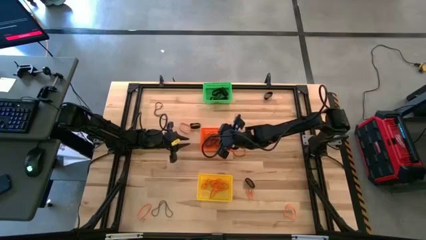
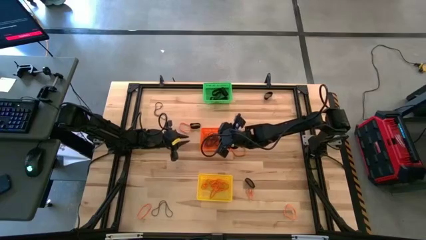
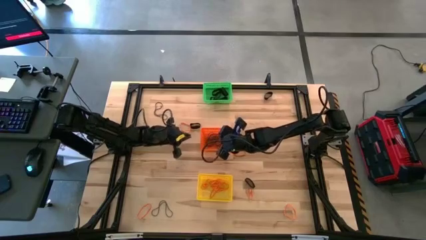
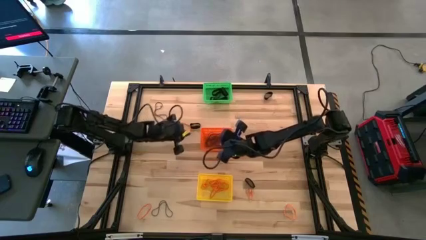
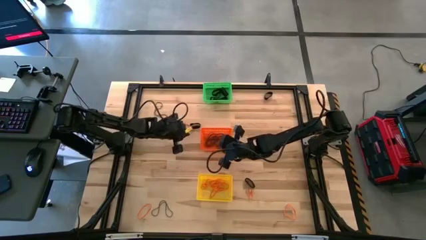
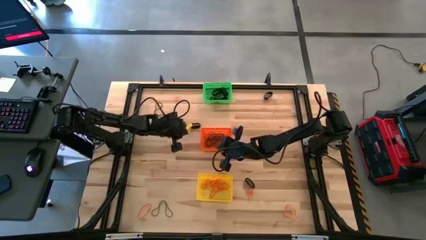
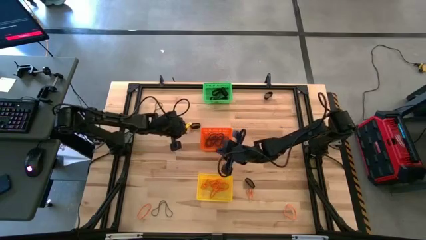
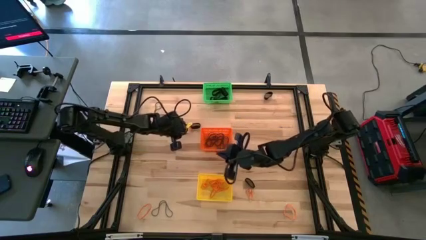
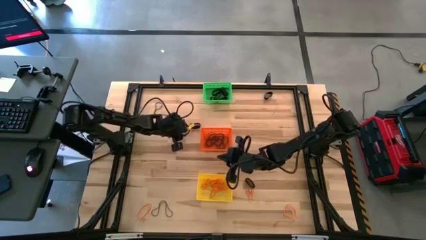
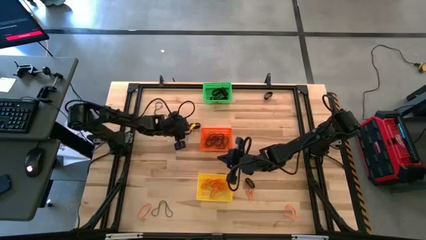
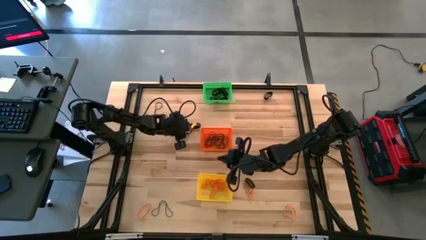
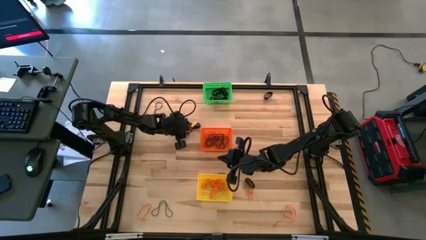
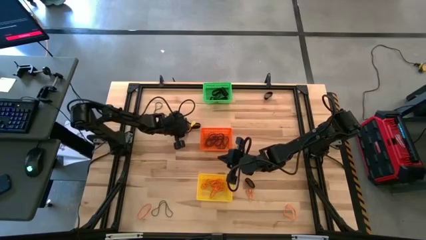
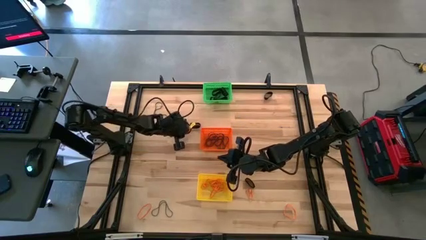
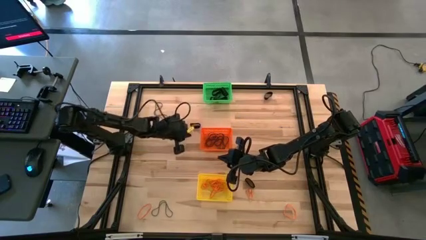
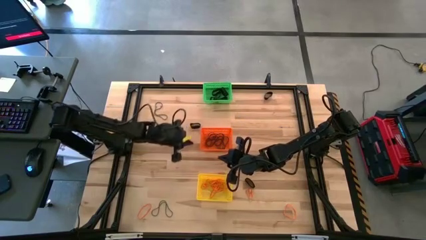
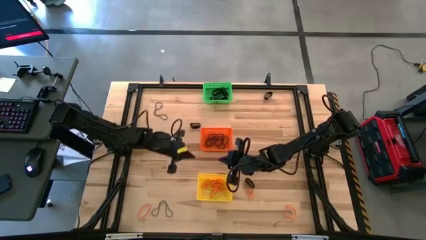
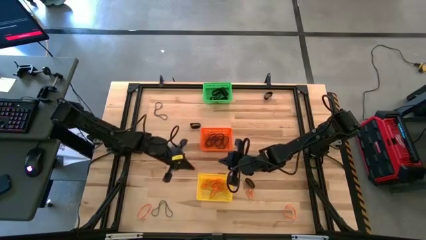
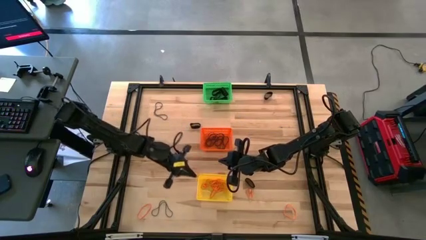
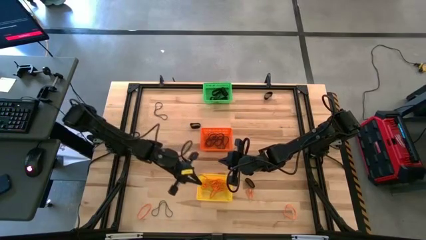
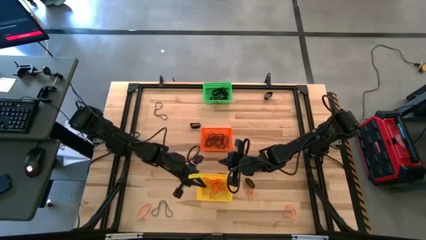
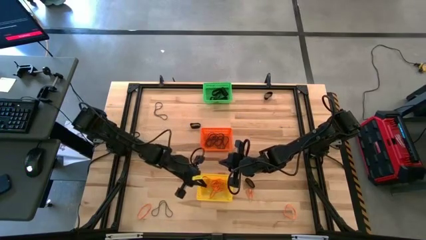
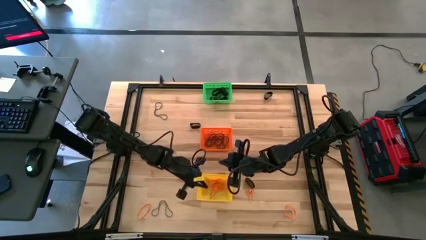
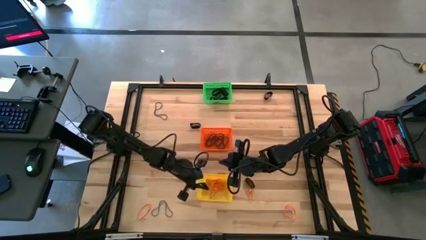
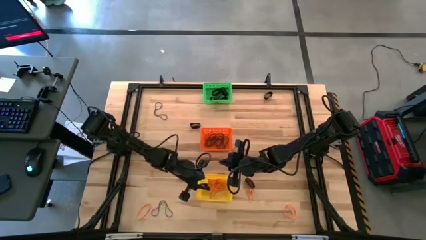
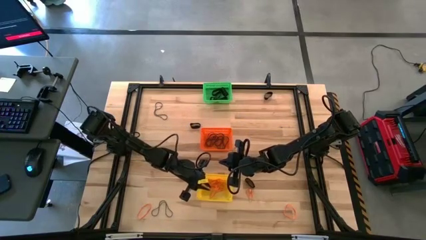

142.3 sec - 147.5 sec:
Task: Sort rubber bands into baskets
Put the orange rubber band into the yellow bin

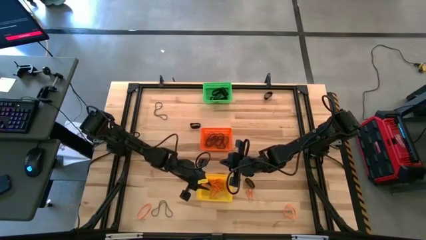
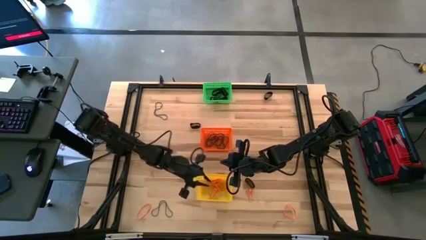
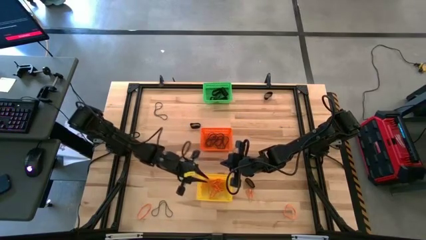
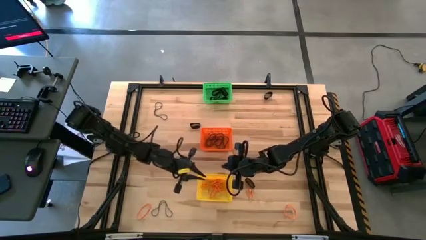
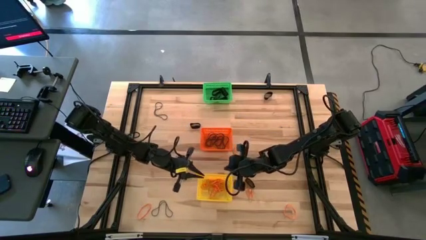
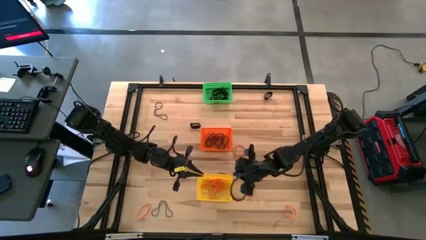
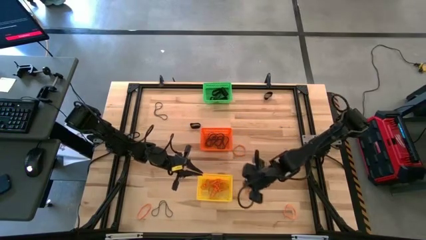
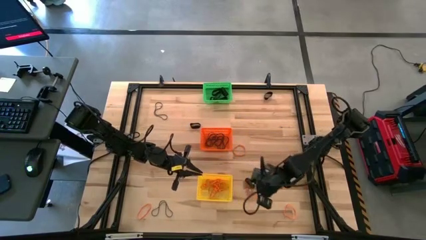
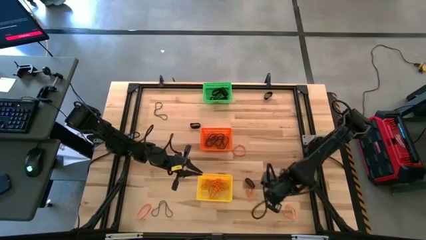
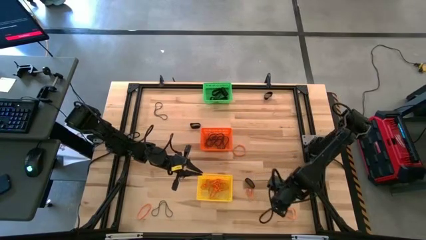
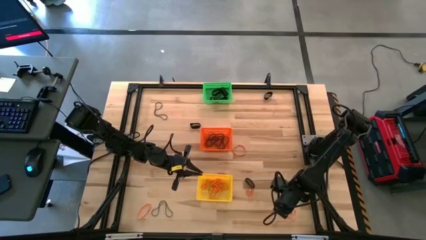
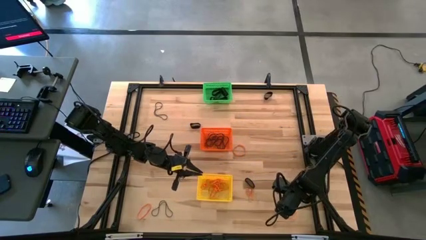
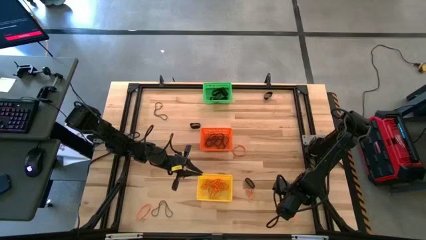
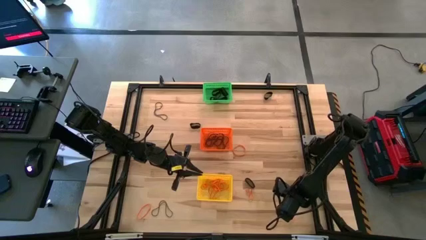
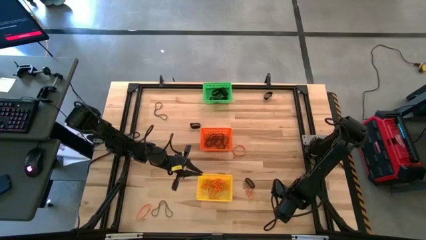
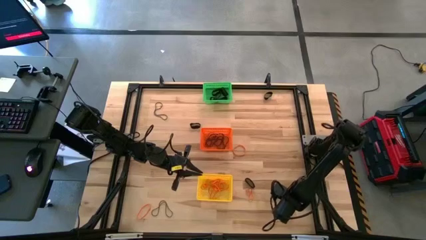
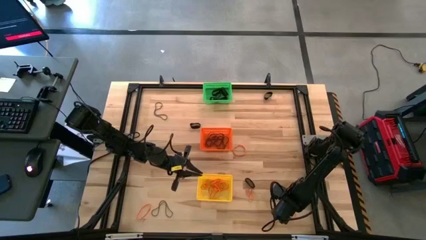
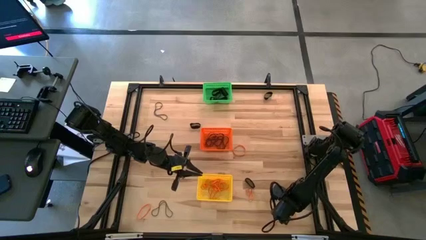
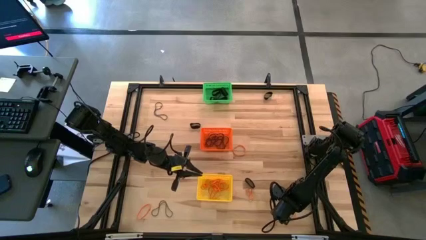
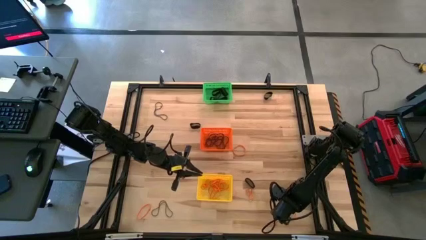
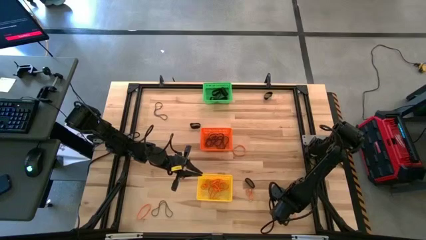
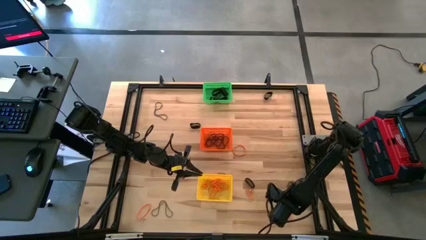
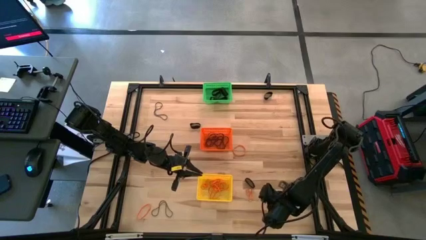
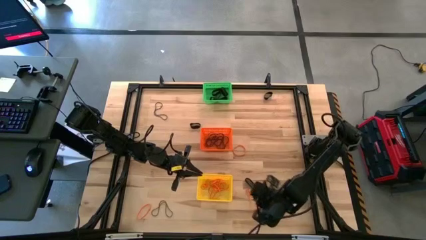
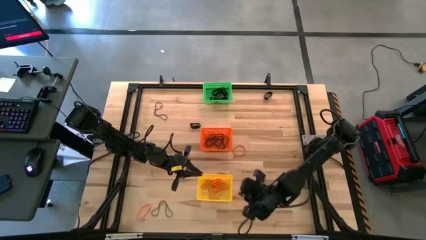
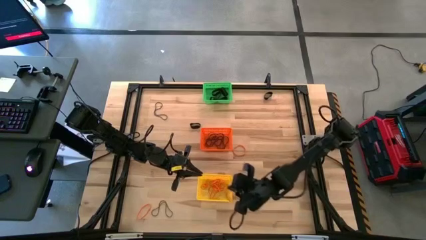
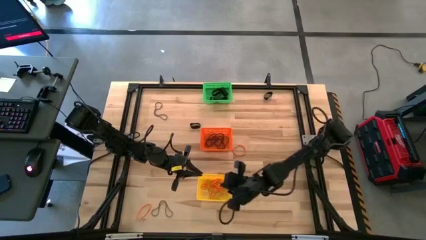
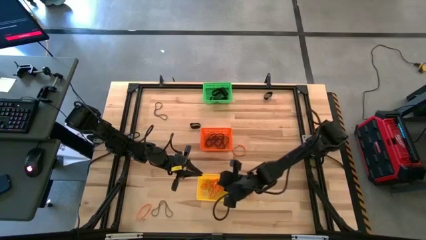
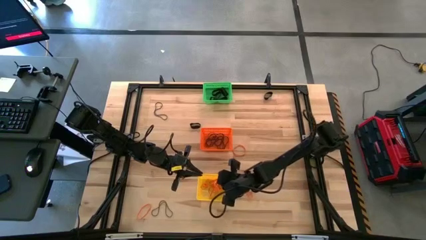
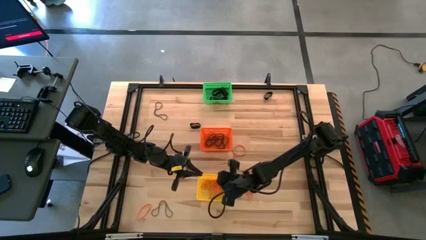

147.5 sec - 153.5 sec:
Put the orange rubber band into the yellow bin

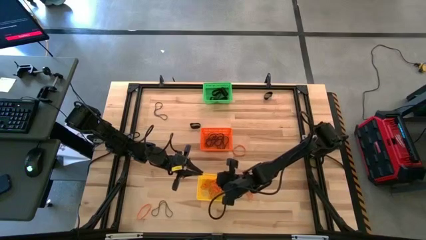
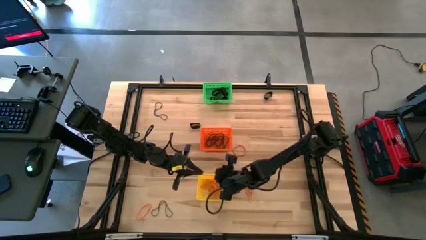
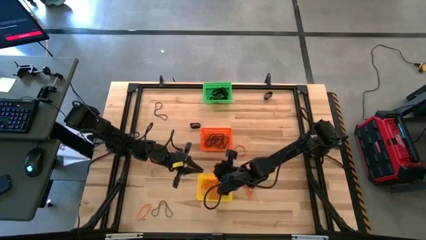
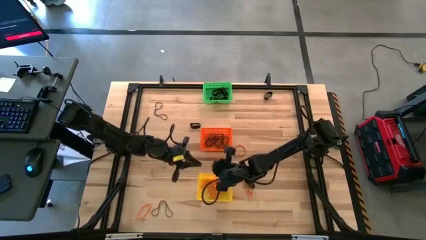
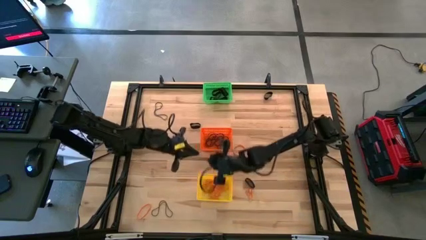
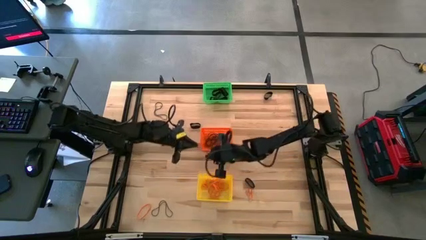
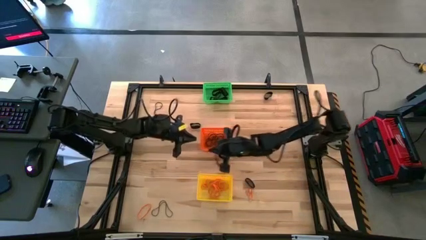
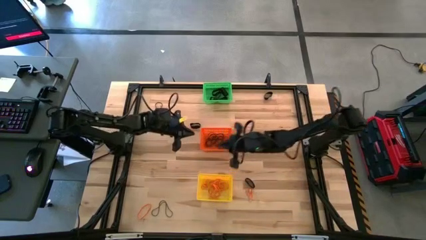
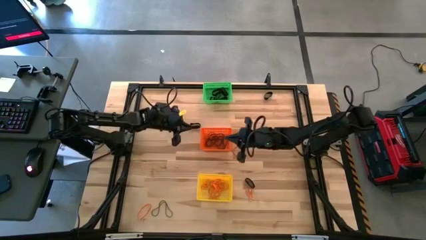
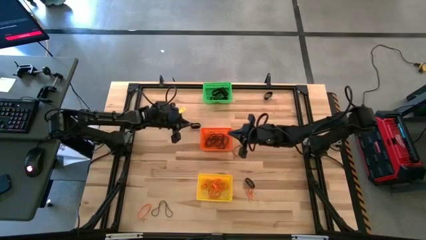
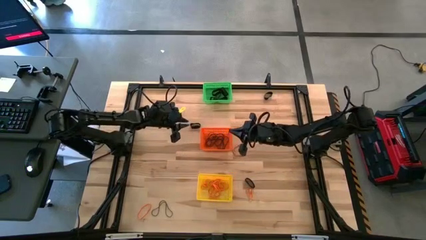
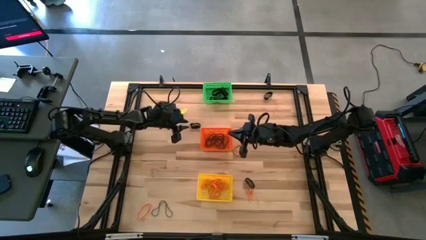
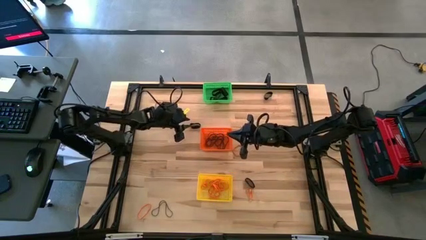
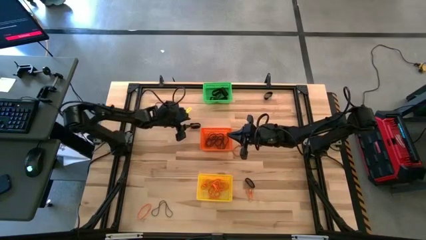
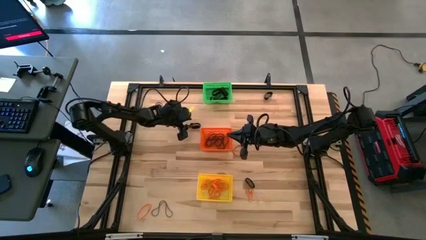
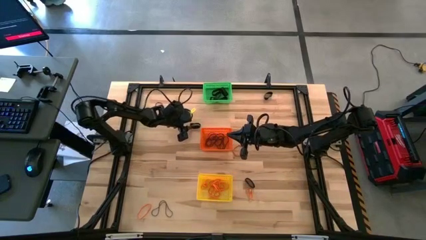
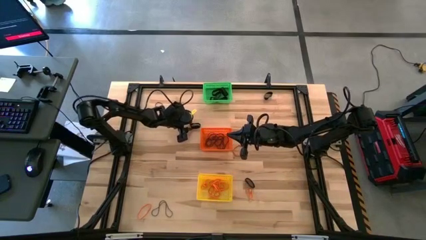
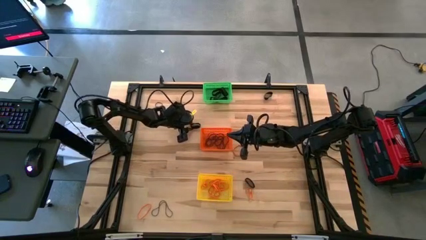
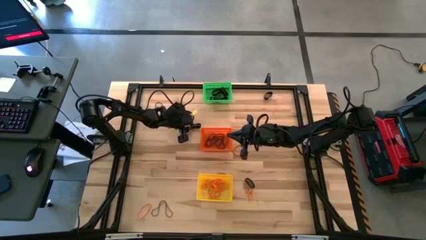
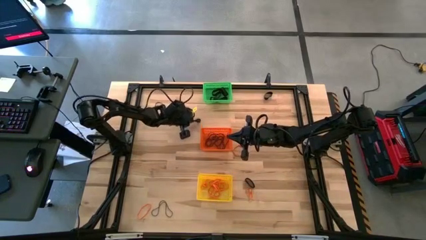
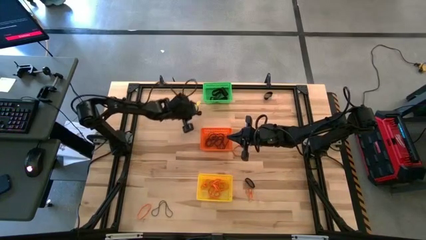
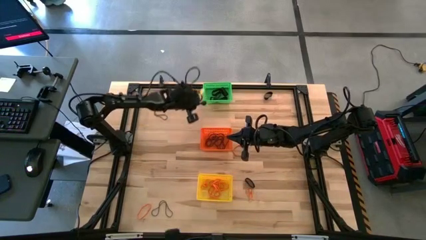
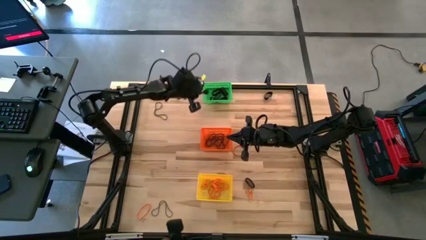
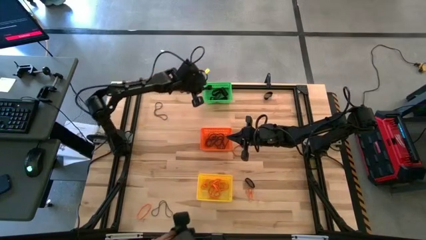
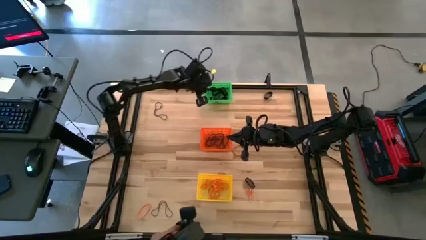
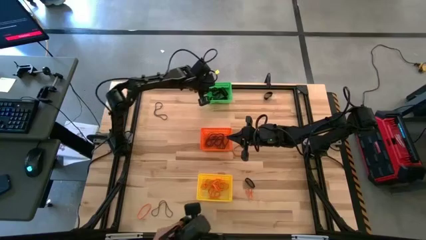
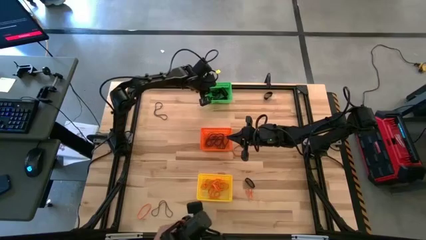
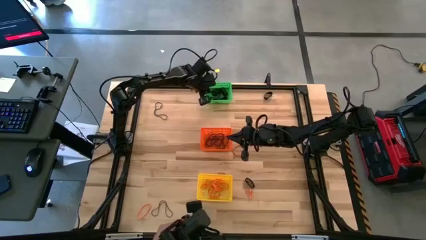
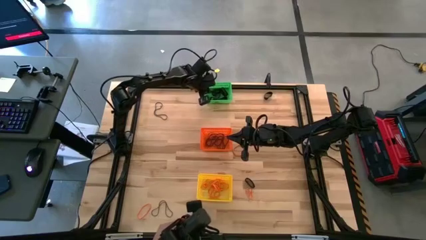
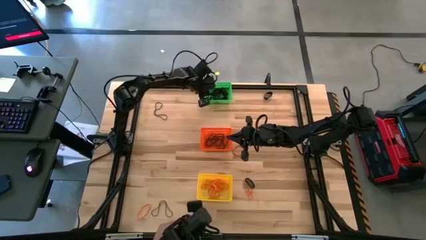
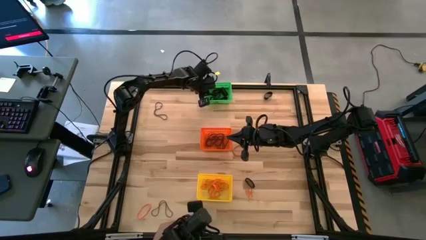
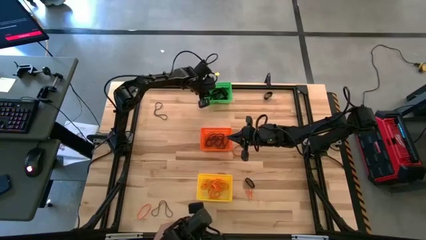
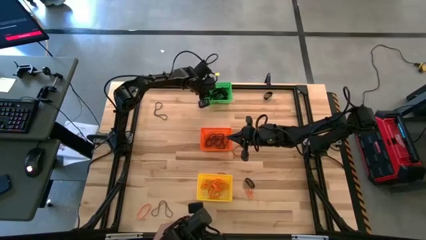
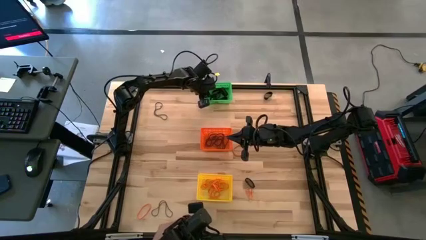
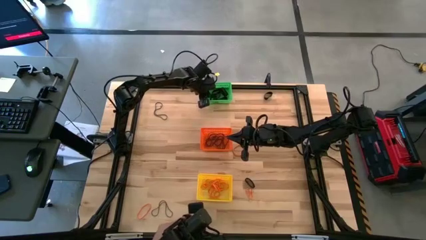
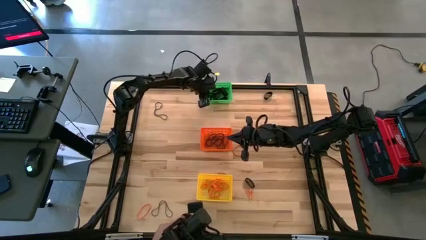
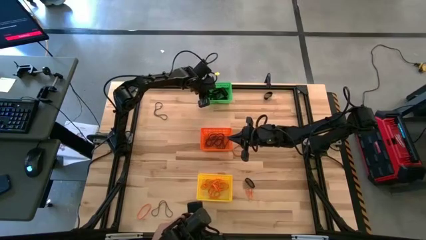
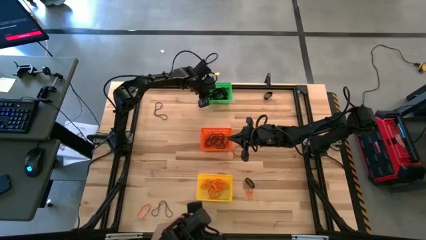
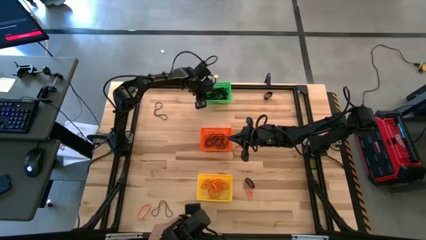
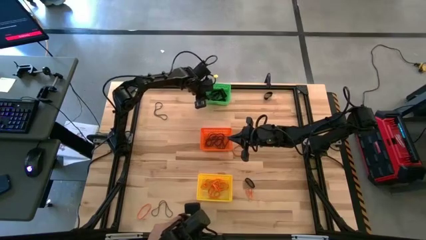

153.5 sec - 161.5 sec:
Put the black rubber band into the green bin
